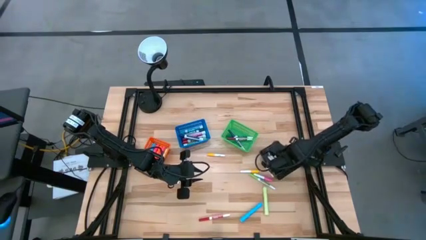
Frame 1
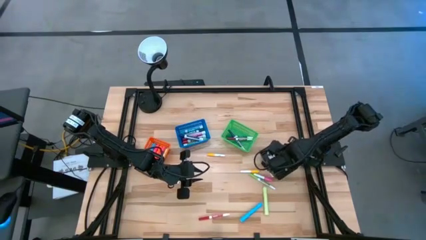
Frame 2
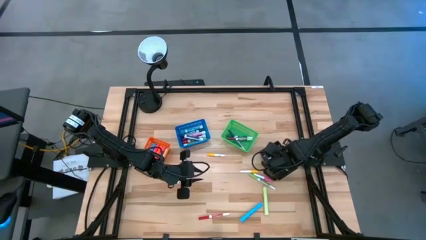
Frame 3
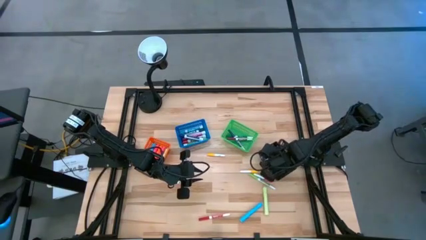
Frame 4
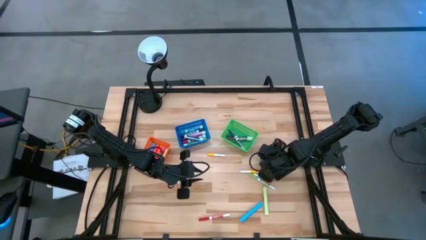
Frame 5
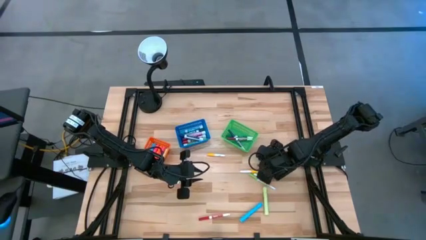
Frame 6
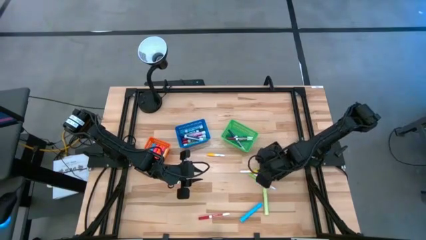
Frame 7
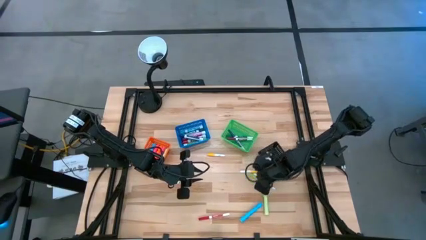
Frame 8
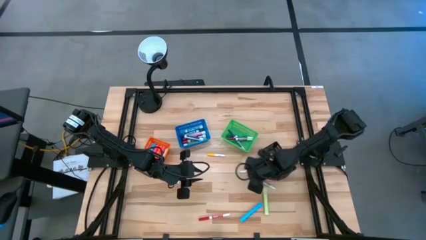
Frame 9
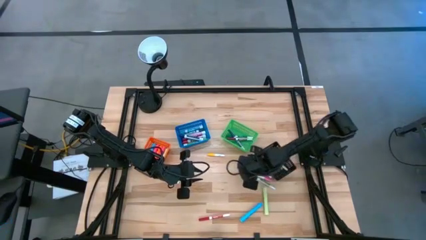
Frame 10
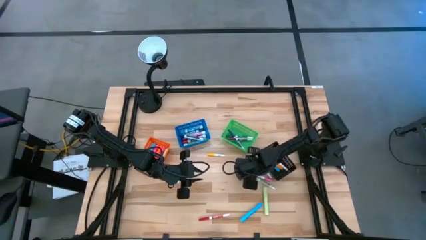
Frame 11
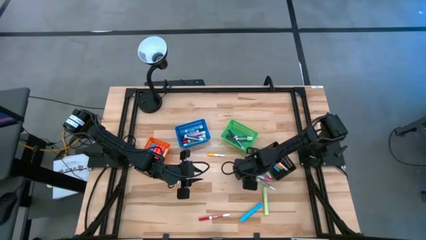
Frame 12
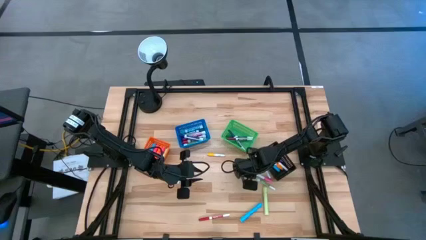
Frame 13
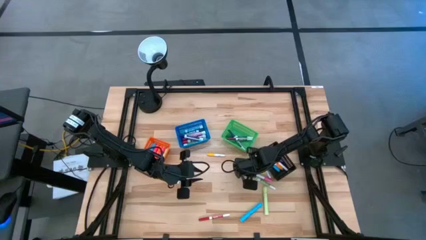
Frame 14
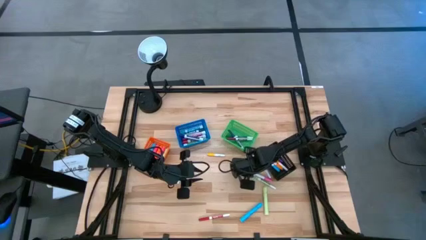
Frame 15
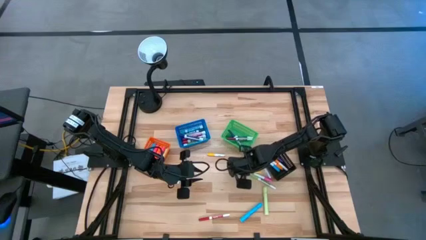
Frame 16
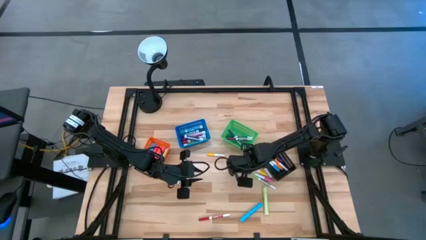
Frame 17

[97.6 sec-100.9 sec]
Task: Pick & Place Markers
Put the small right yellow highlighter pen into the black basket

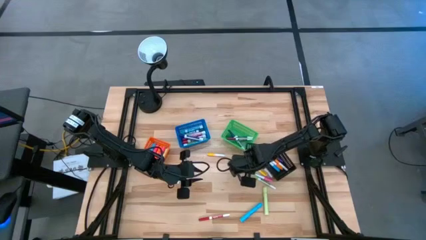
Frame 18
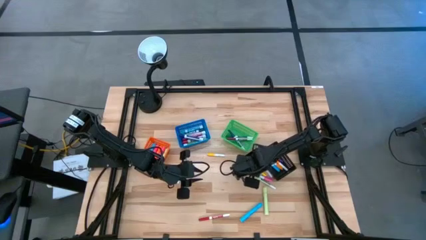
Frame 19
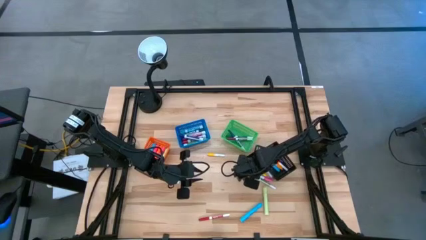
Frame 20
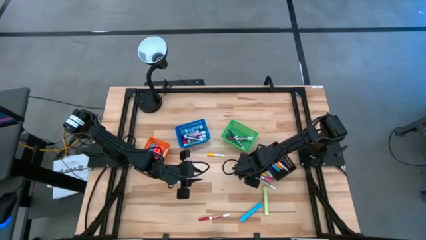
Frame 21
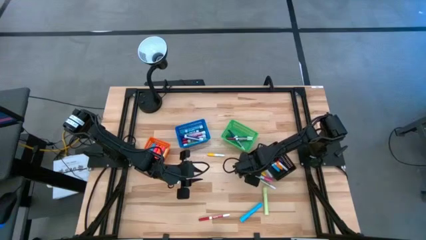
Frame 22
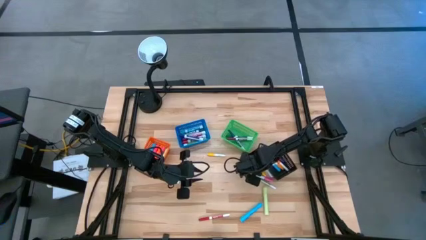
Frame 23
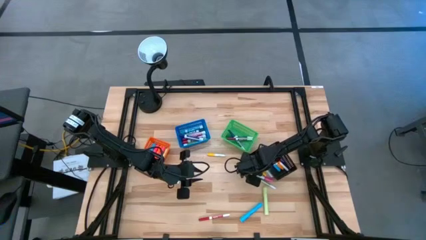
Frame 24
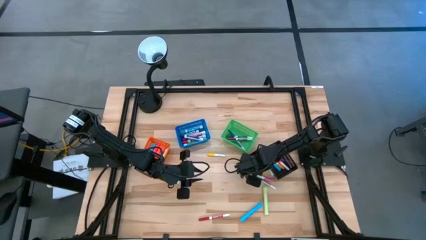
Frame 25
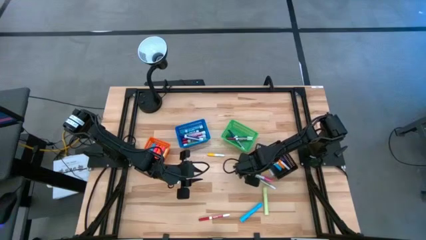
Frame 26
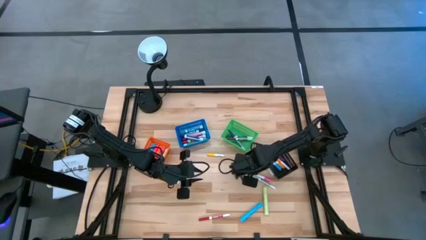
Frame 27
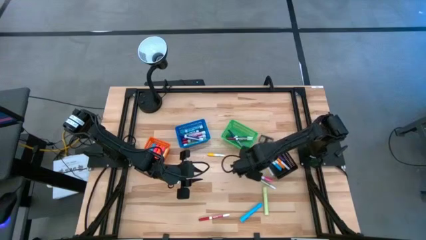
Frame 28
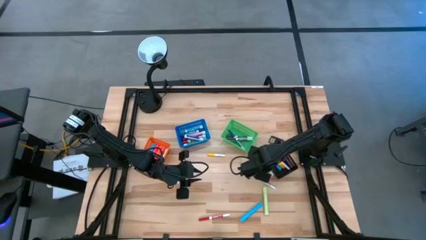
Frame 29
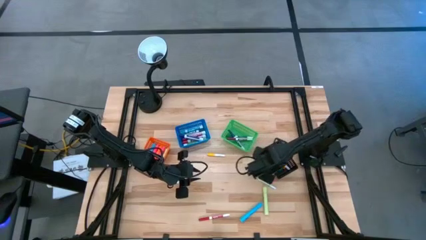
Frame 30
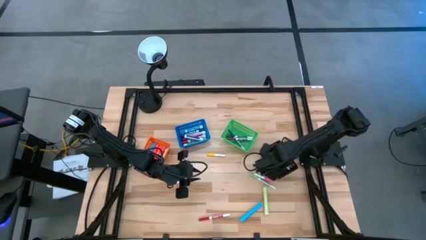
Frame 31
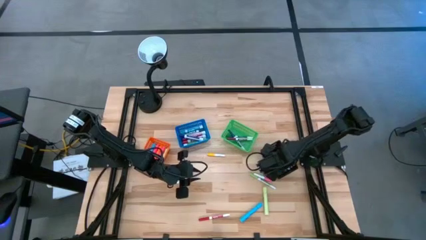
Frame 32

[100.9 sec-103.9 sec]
Put the small right yellow highlighter pen into the black basket

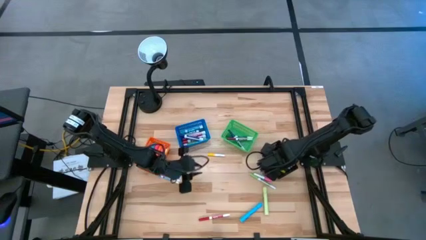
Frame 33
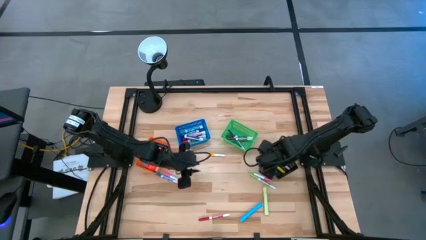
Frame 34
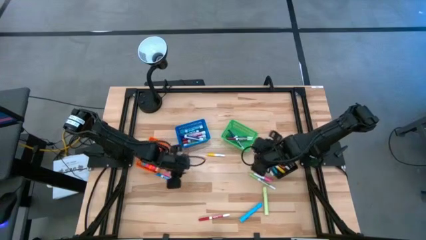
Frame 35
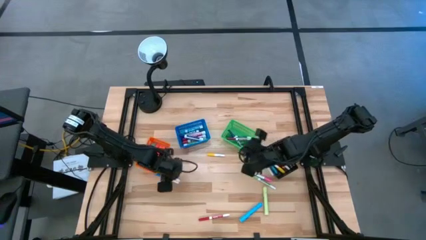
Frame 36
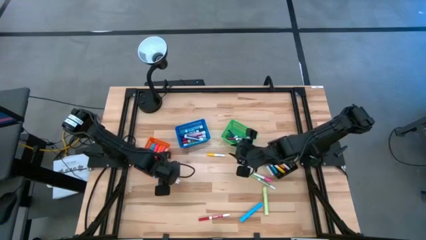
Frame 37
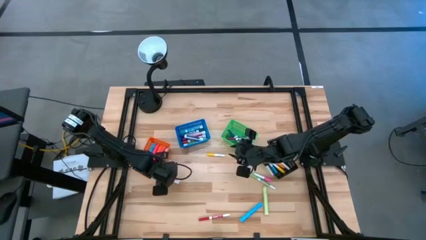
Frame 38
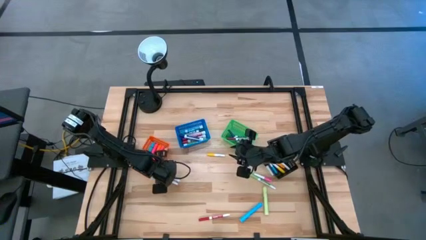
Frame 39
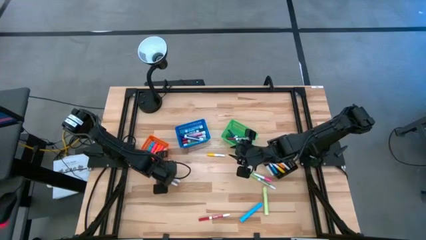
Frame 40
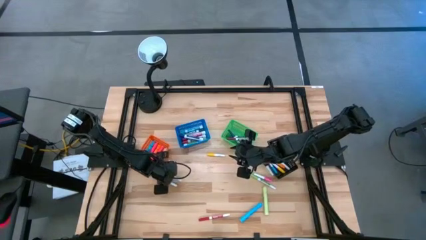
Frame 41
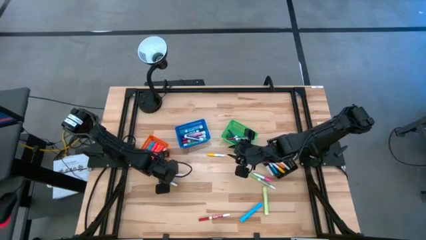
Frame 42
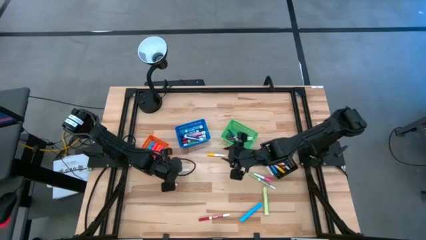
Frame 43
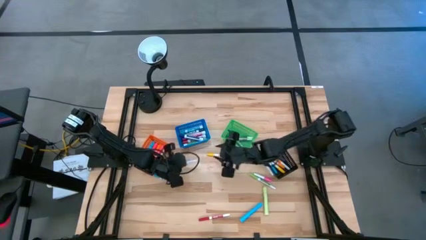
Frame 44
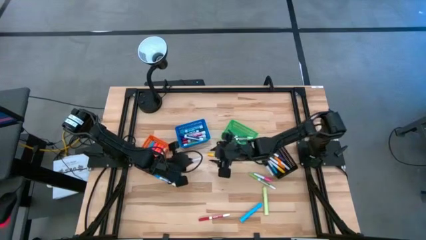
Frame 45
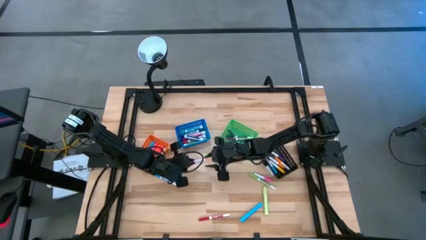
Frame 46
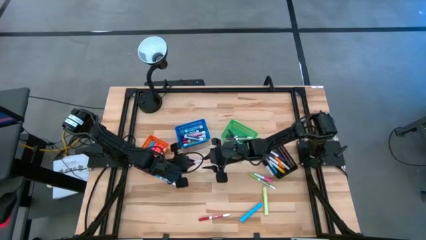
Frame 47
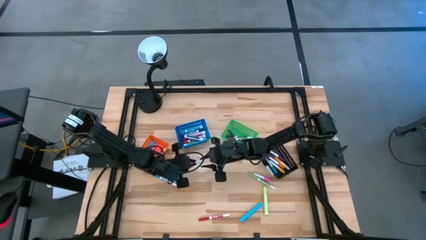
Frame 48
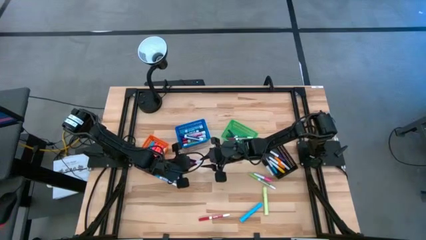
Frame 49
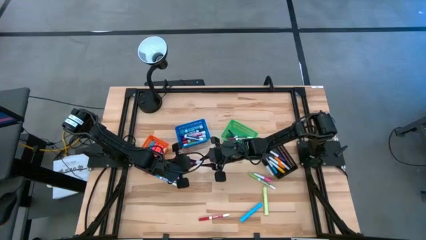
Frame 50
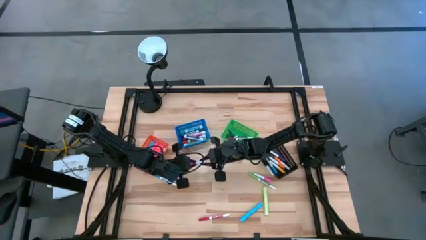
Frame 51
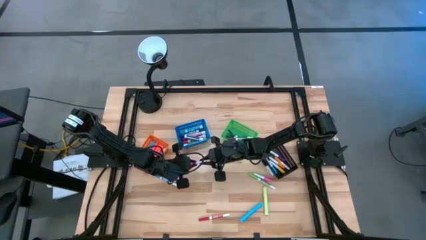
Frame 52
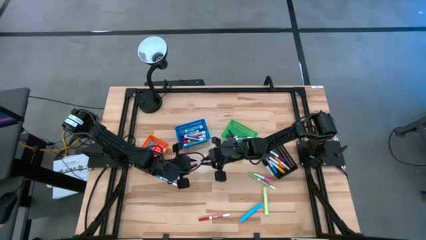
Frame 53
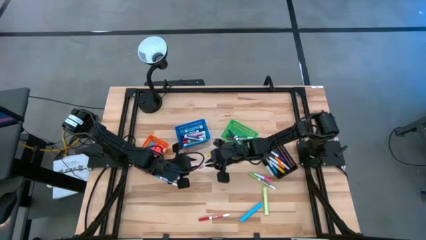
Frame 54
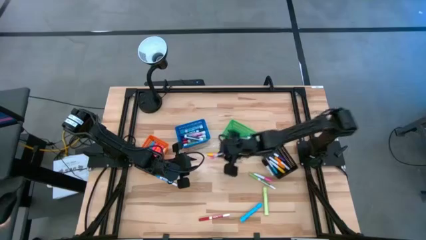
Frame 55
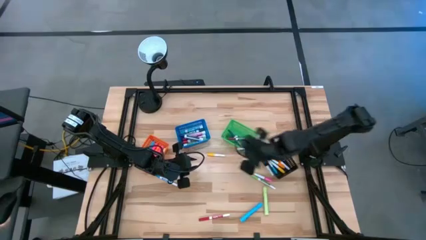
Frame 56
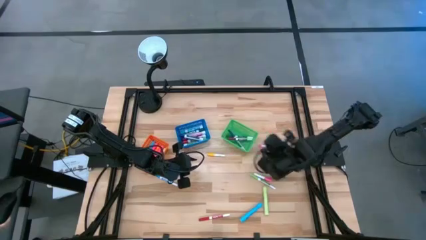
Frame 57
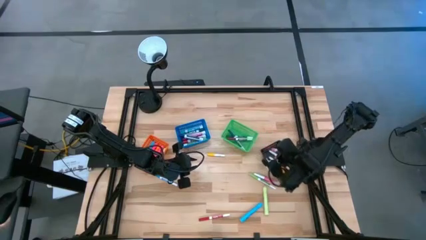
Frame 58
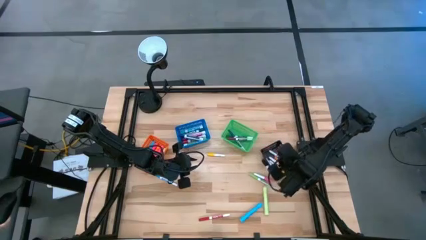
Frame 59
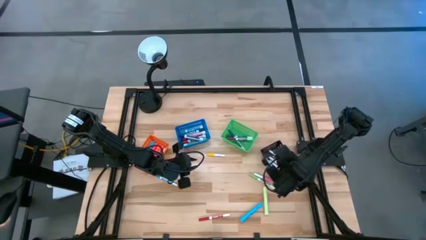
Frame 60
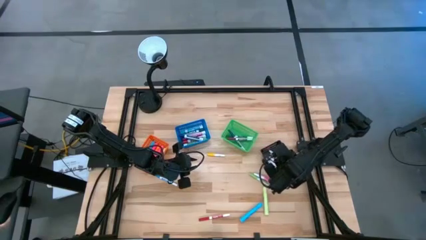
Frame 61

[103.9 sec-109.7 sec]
Put the small left pink highlighter pen into the black basket

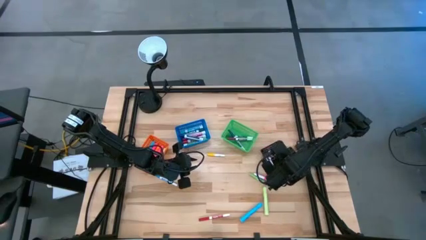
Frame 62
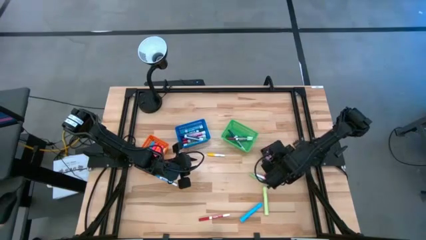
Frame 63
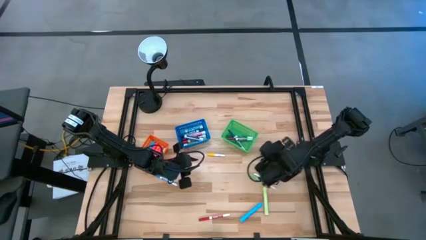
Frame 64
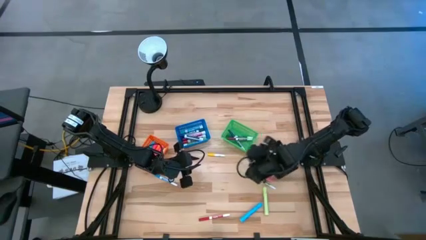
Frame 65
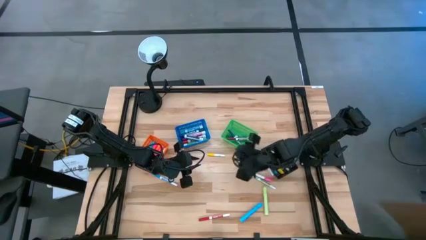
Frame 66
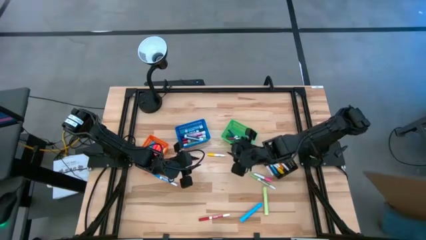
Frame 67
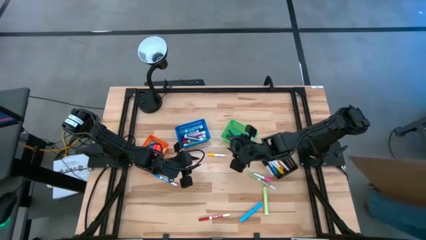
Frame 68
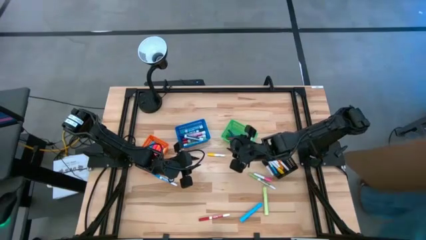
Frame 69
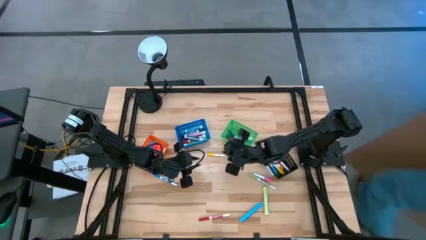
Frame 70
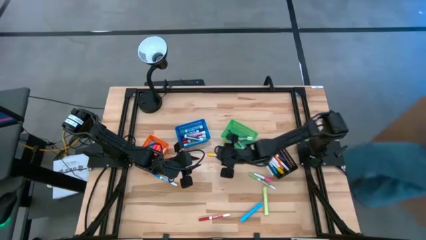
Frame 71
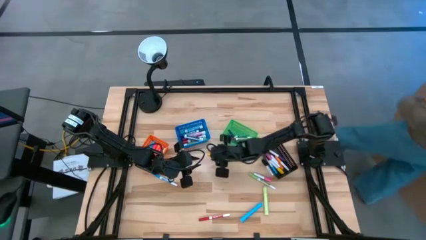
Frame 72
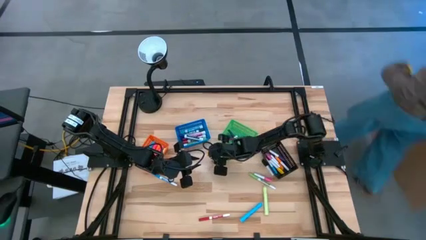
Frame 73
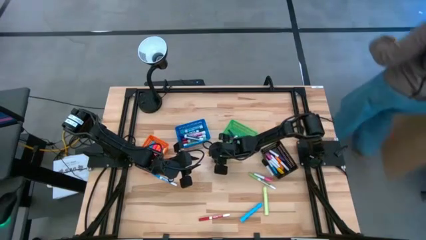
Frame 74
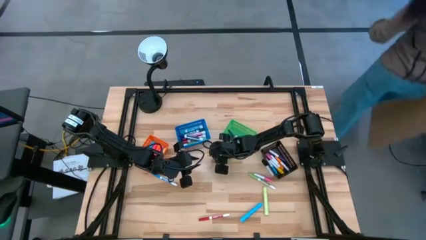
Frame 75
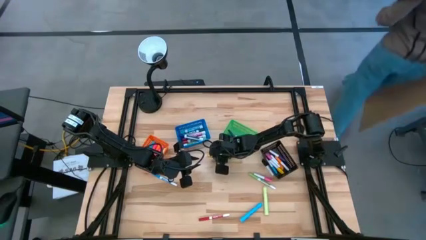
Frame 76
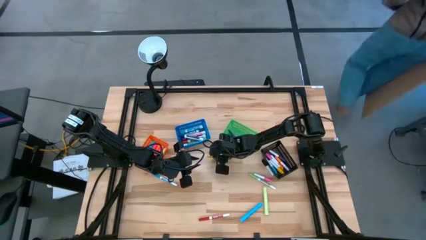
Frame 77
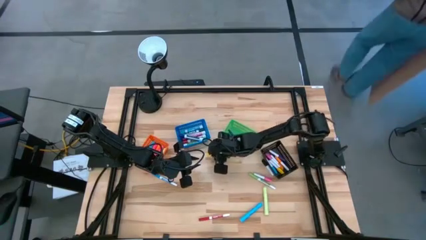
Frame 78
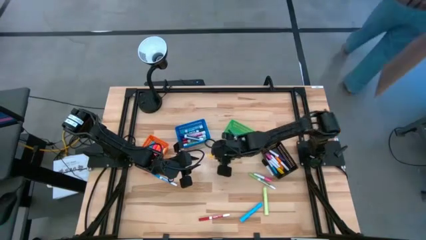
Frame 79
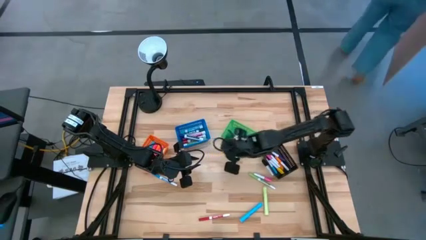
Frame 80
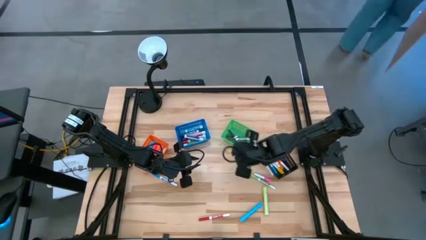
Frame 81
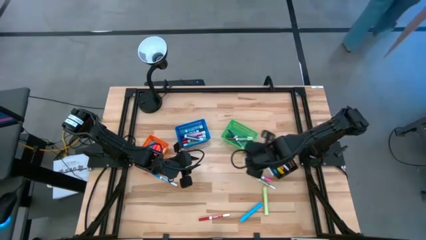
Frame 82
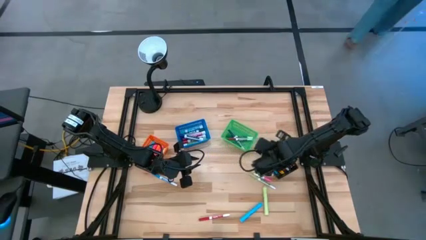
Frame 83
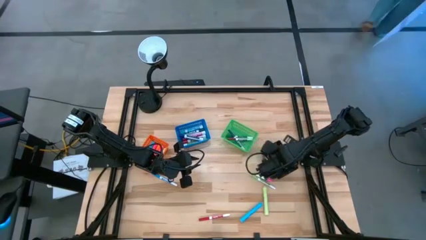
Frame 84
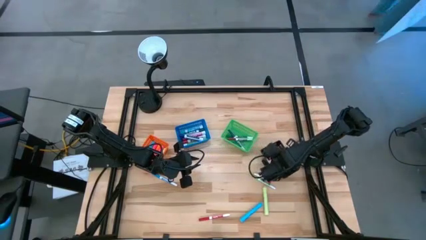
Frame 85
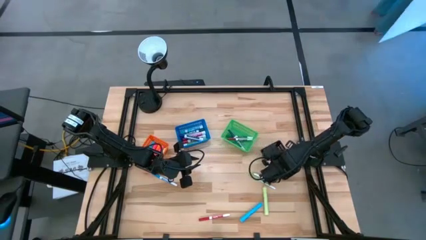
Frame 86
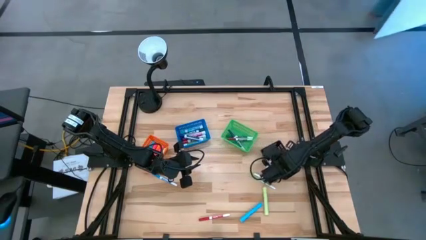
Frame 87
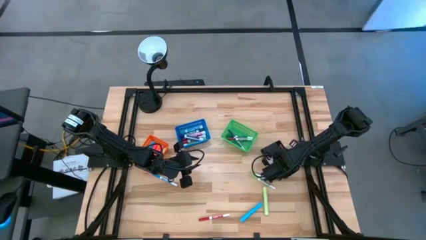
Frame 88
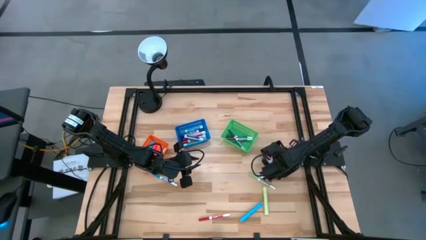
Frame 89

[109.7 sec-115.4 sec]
Put the small yellow highlighter pen into the black basket
